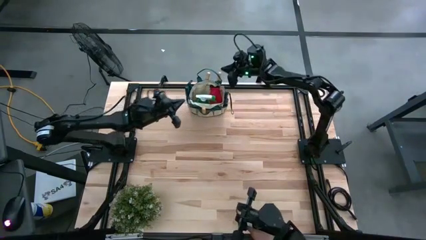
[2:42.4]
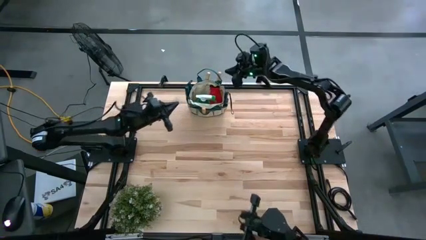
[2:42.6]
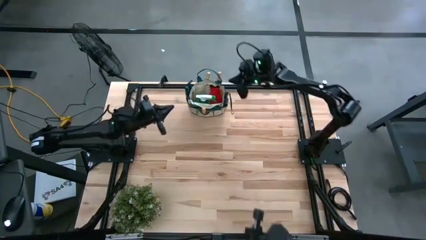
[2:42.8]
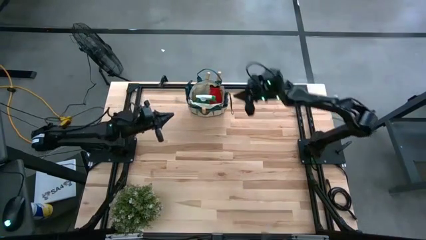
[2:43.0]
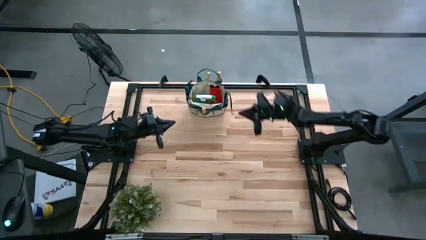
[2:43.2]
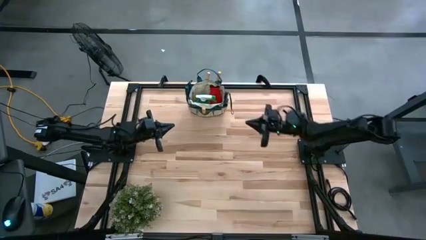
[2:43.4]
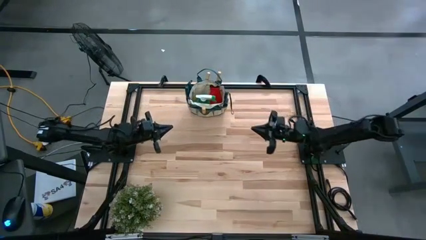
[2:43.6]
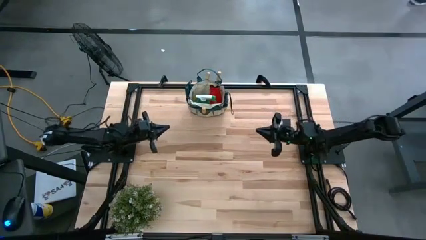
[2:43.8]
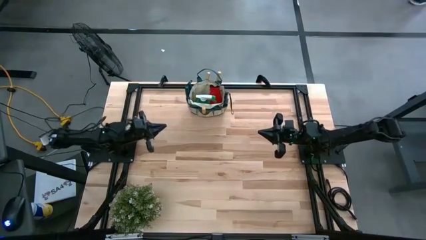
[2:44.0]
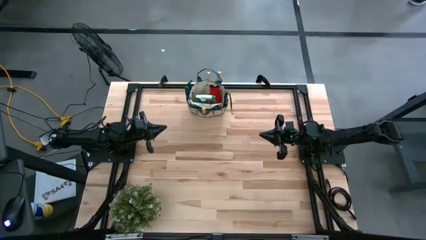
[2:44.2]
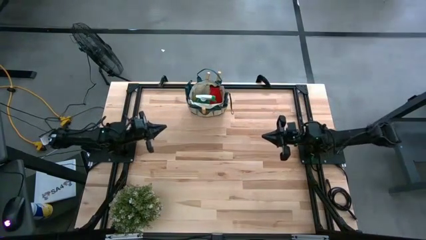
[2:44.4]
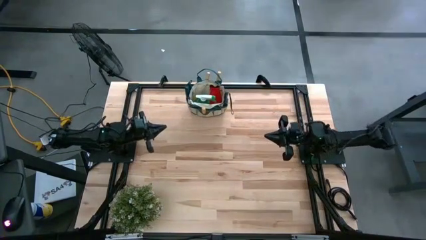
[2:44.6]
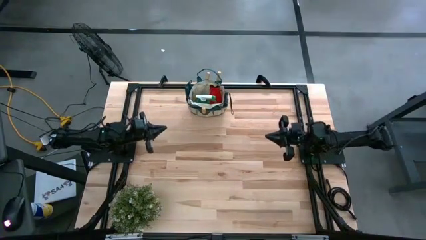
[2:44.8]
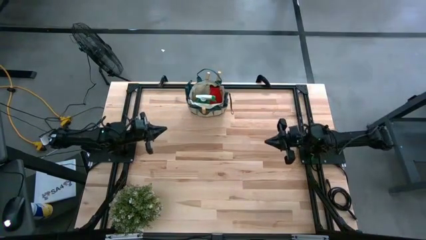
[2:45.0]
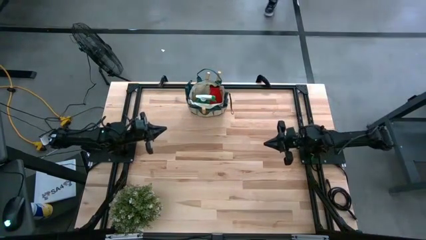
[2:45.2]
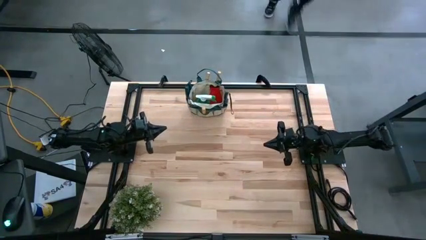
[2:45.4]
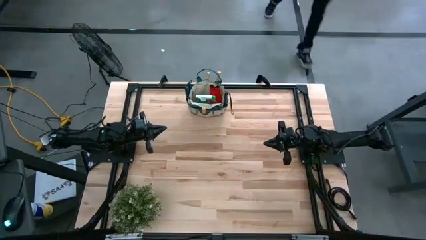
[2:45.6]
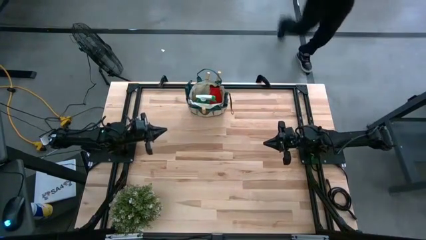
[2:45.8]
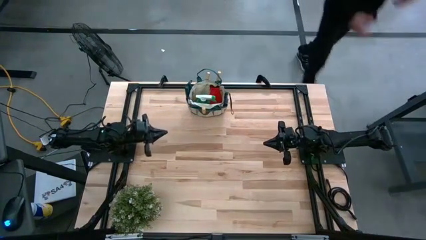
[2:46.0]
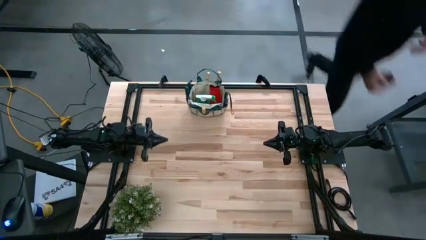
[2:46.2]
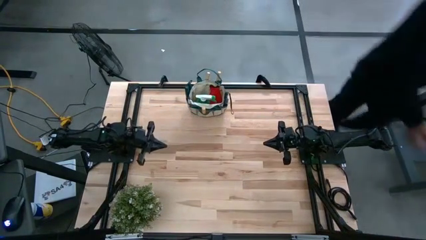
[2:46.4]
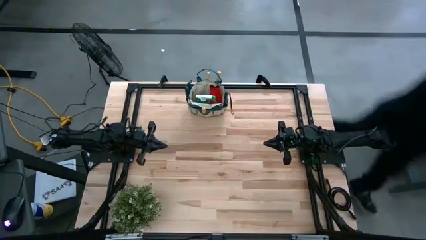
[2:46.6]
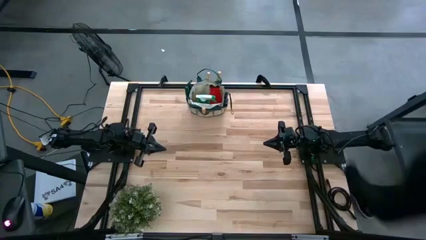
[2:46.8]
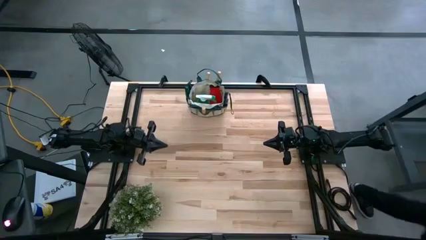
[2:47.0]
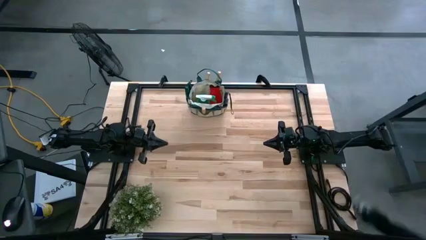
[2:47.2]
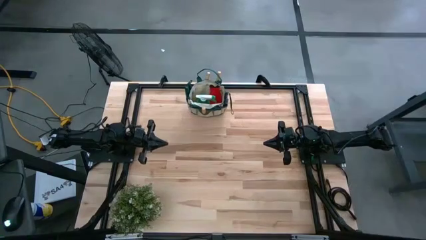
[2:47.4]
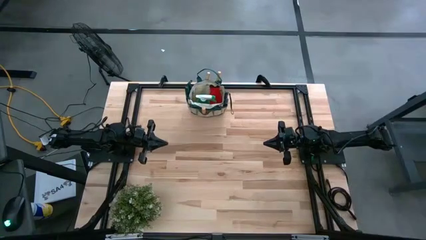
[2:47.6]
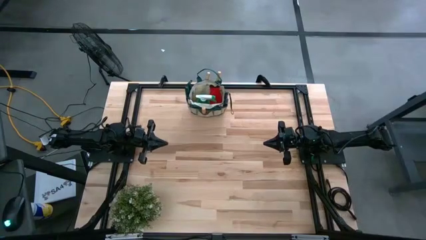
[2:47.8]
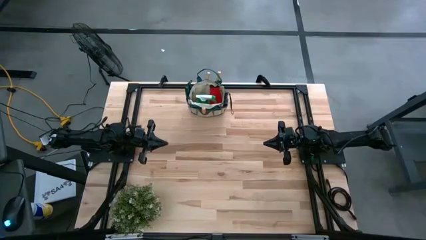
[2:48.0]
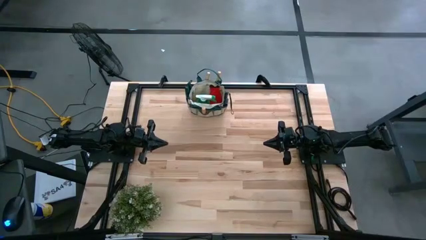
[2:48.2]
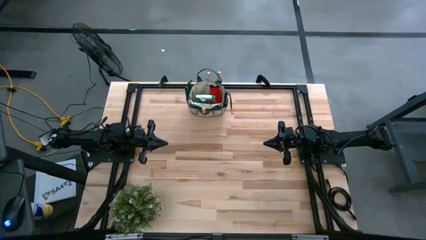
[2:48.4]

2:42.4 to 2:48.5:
Task: Pick & Place Garden tools in Gardening bag
Return to Home Position

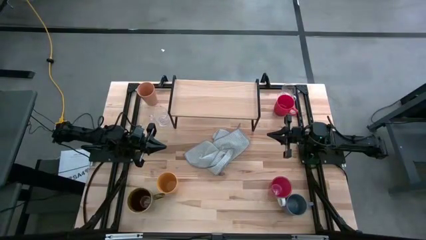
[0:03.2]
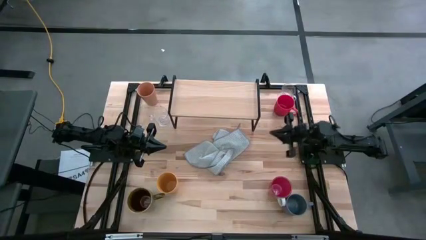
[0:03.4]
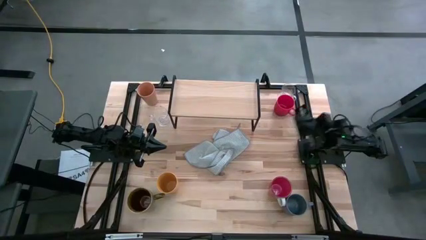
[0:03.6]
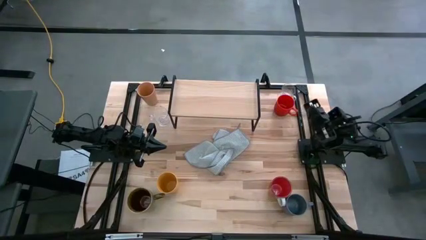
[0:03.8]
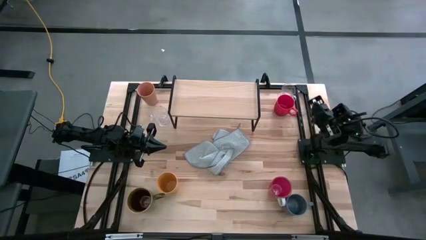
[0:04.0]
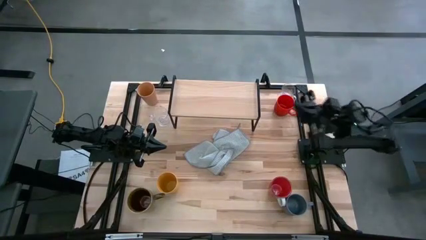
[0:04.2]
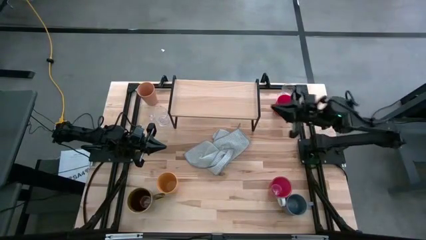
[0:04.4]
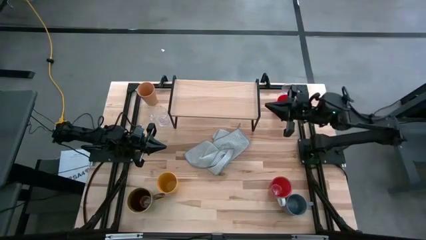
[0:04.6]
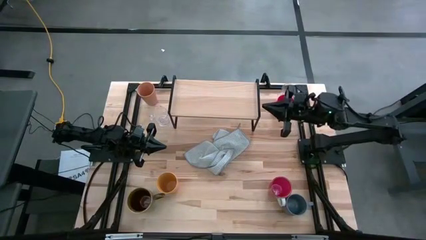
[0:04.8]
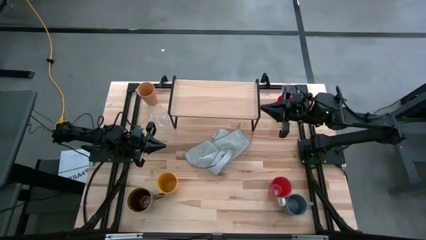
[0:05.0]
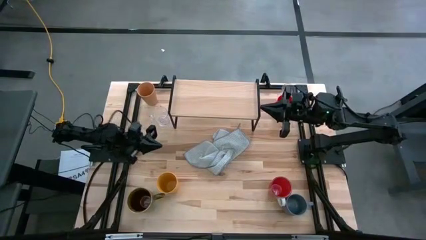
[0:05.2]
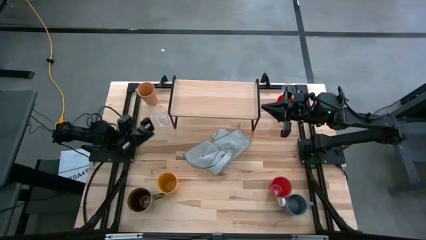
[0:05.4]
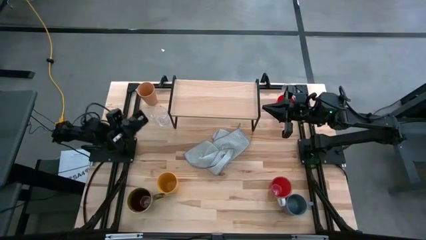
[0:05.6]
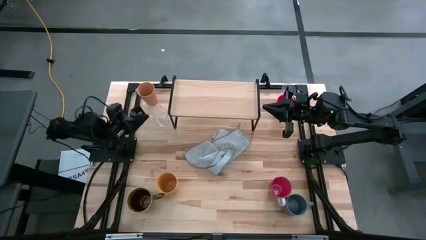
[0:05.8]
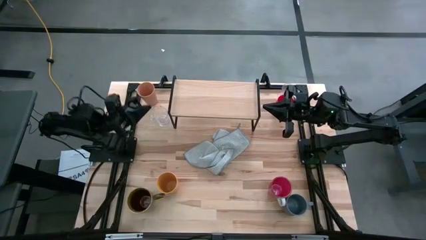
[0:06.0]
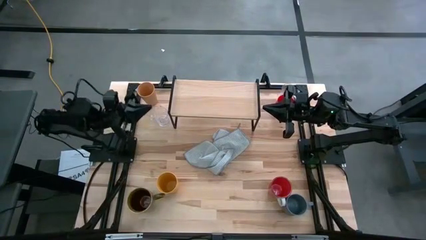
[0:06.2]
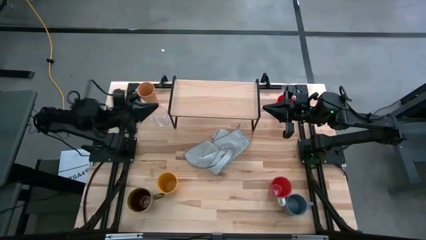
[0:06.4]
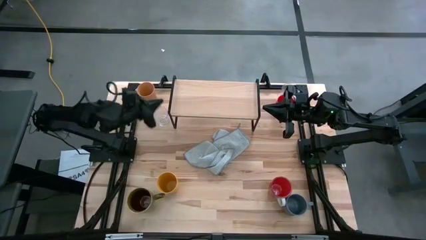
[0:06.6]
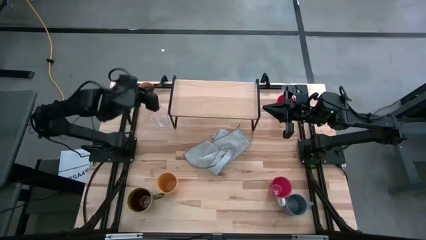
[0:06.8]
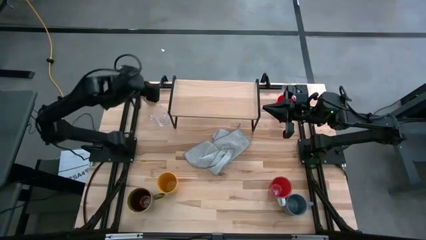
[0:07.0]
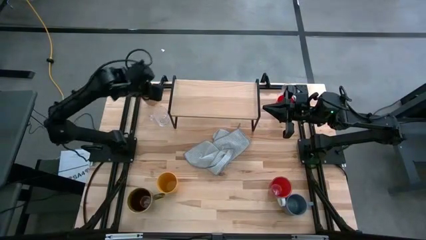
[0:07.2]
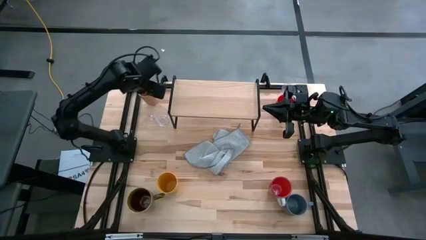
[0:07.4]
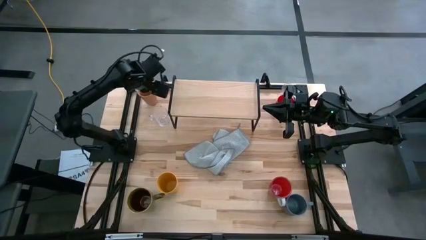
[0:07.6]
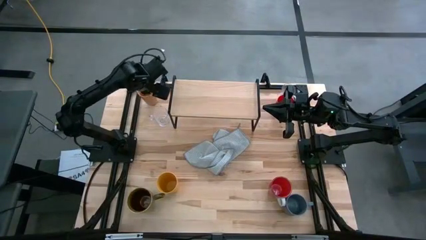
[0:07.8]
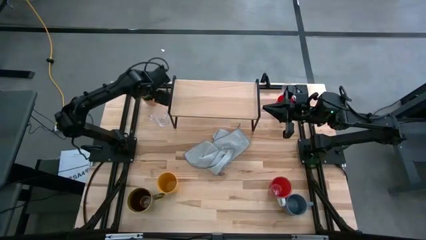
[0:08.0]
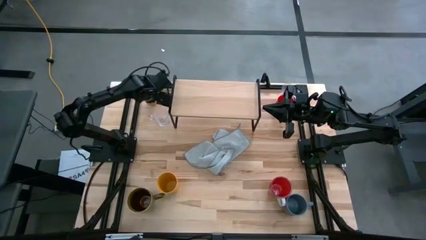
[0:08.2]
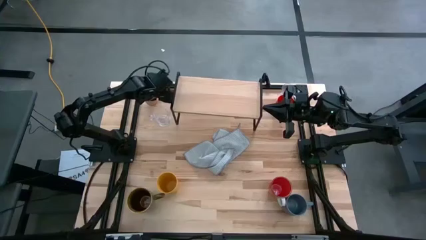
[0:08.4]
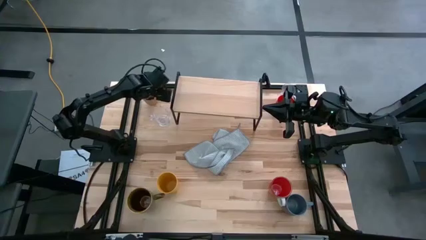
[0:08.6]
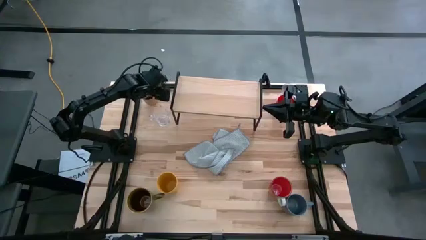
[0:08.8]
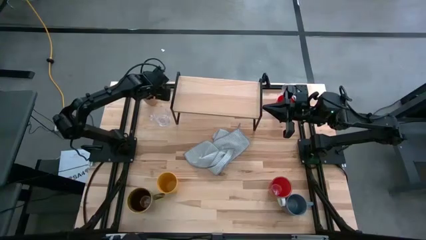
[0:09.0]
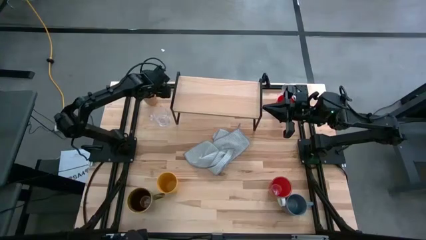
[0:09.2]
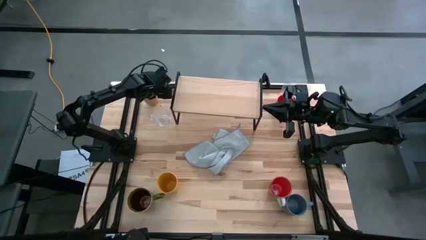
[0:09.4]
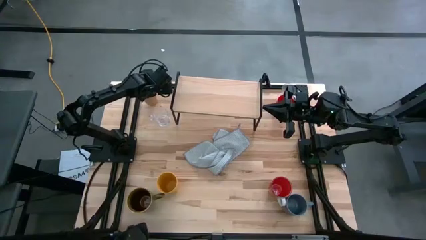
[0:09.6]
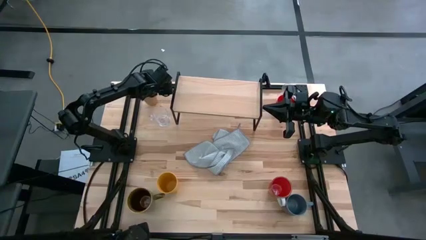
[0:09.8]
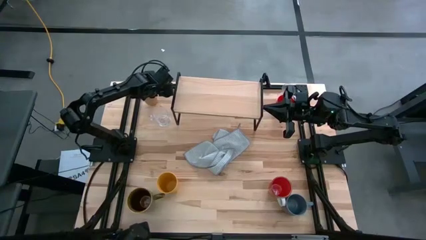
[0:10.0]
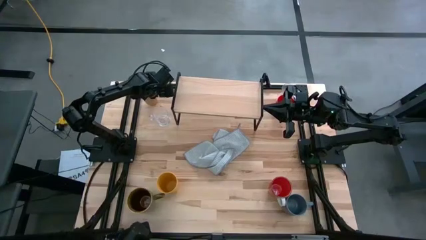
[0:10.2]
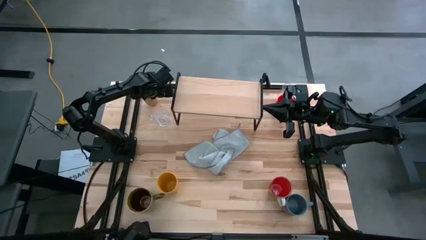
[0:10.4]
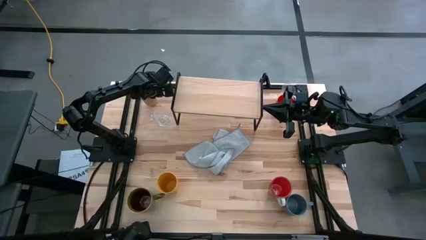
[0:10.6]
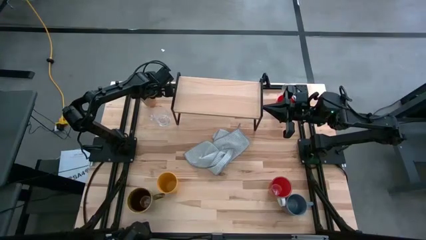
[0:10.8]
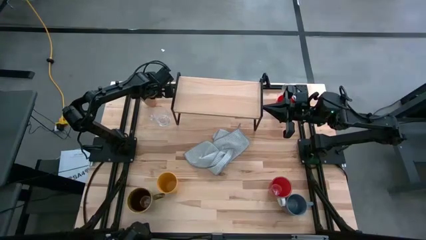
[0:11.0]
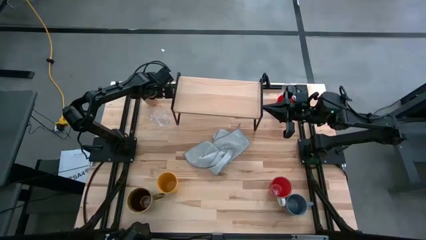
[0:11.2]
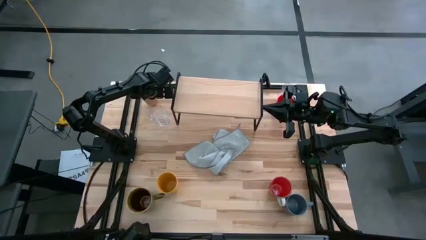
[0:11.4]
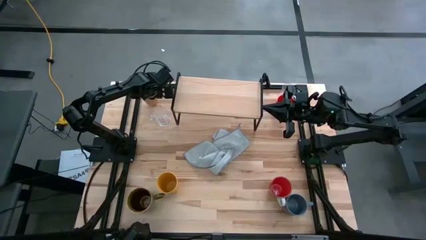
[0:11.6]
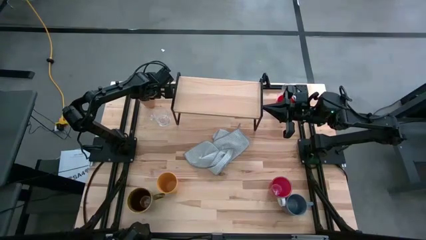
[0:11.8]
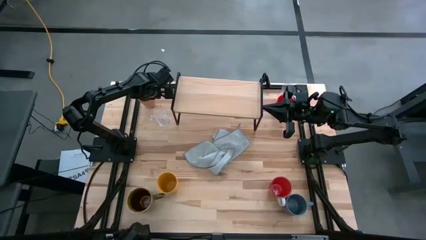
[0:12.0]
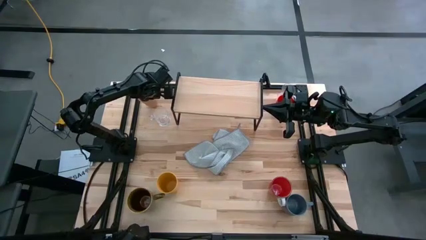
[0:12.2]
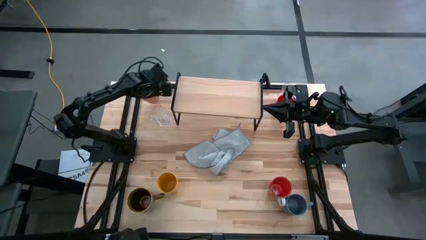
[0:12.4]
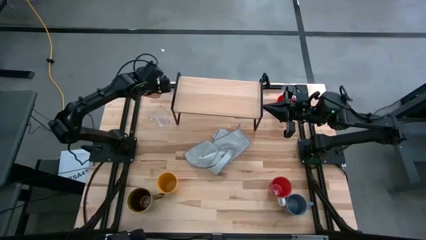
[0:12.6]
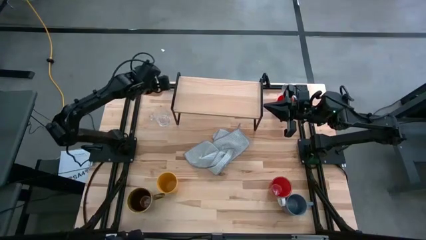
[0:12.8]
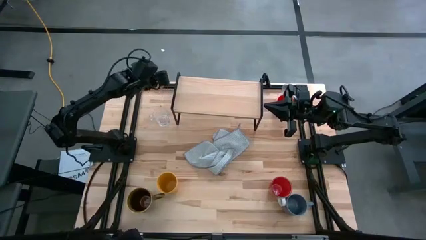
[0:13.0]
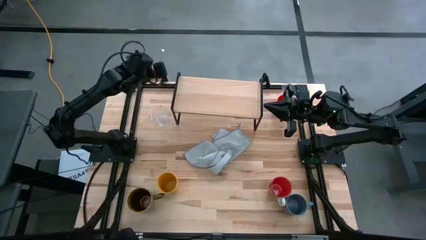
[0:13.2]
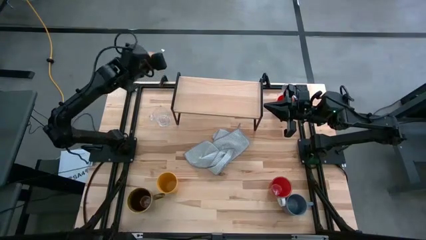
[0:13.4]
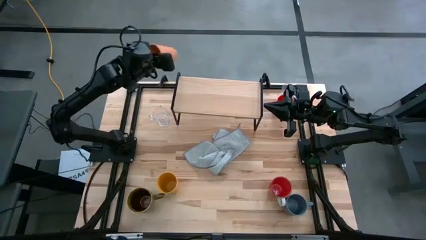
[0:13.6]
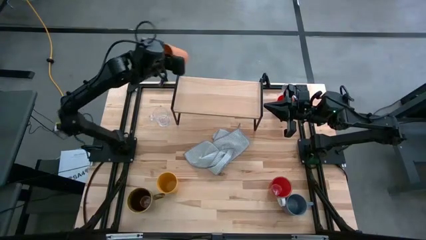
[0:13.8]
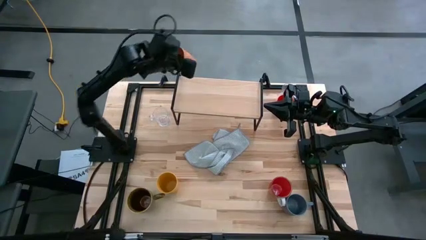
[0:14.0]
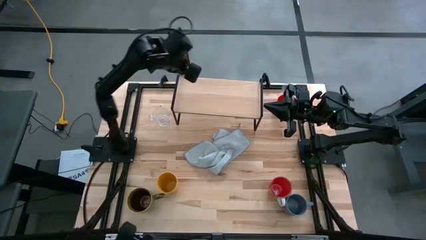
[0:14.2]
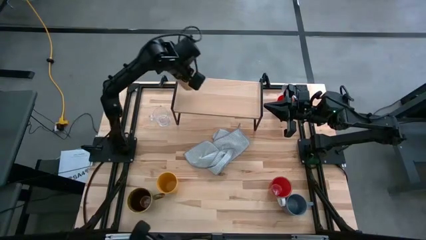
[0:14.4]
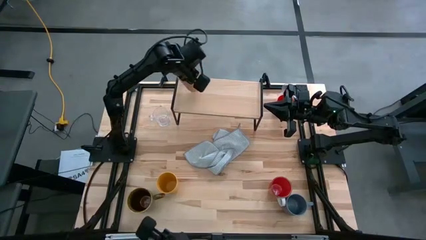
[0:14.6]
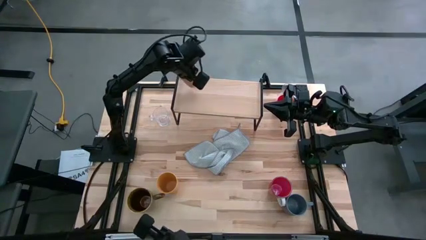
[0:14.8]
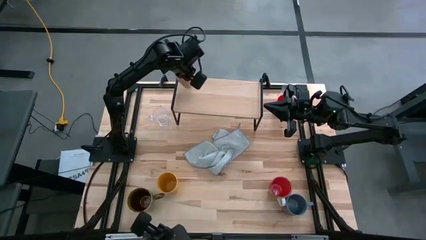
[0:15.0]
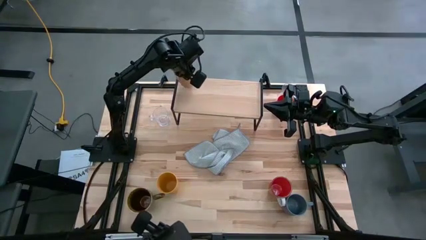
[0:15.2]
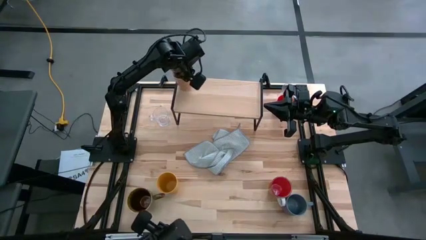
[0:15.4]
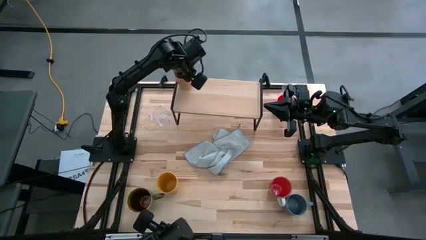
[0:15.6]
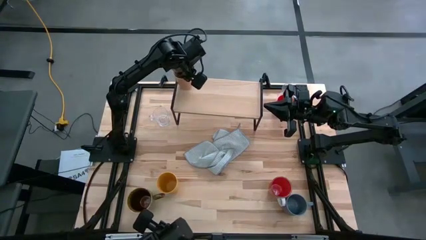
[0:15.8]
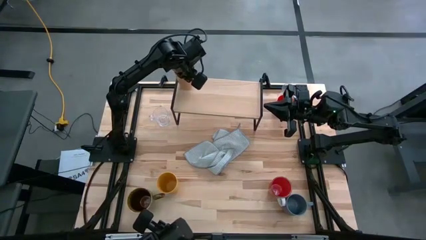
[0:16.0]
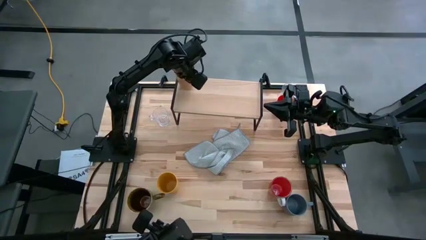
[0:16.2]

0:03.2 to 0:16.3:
Task: Stack small to large cups/mugs on shelf
Put the orange cup on the shelf
